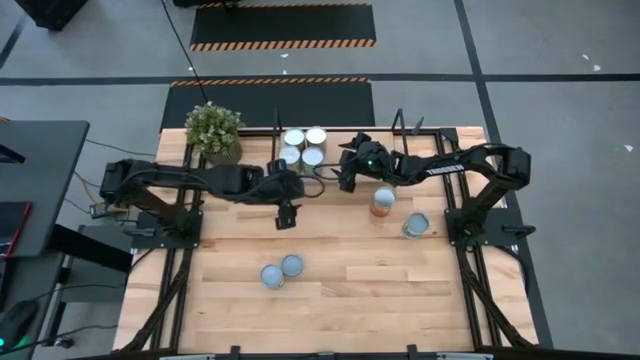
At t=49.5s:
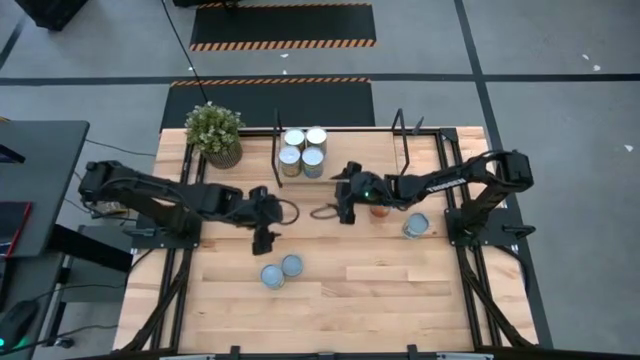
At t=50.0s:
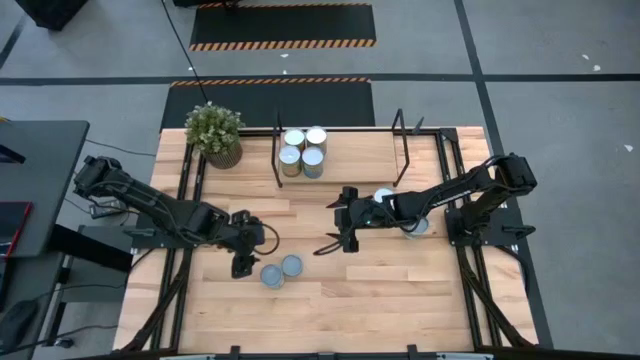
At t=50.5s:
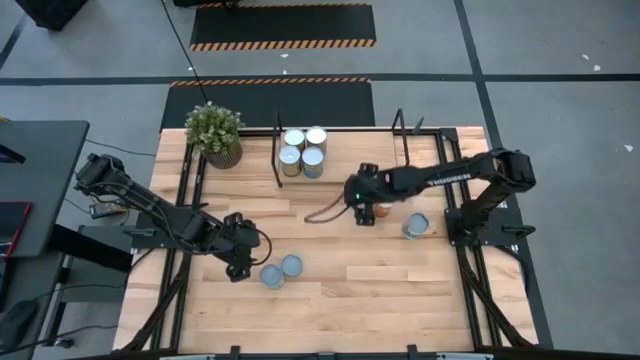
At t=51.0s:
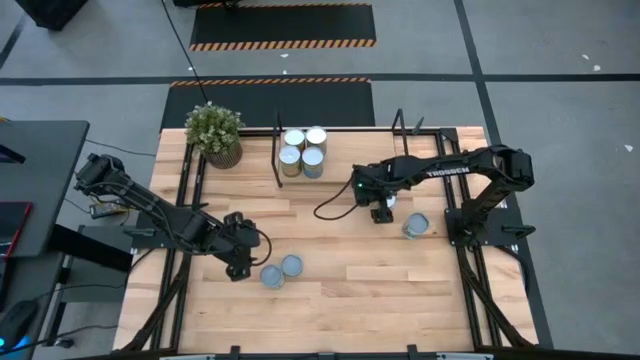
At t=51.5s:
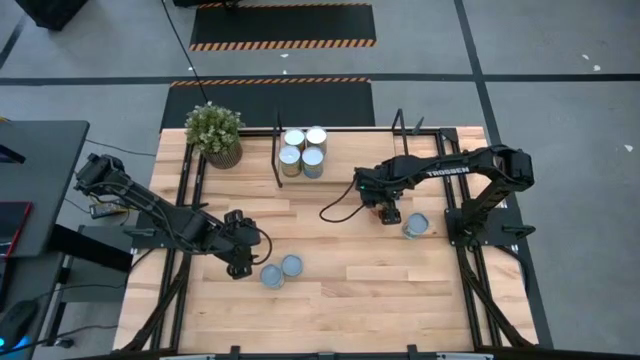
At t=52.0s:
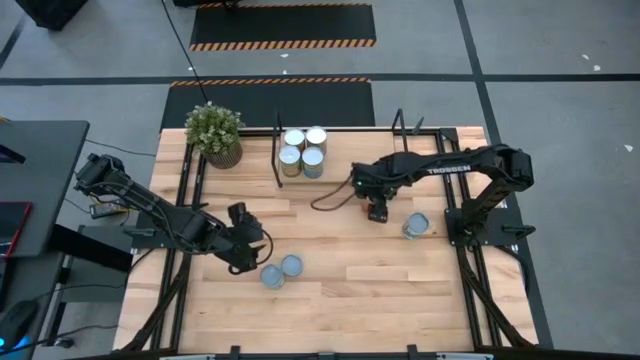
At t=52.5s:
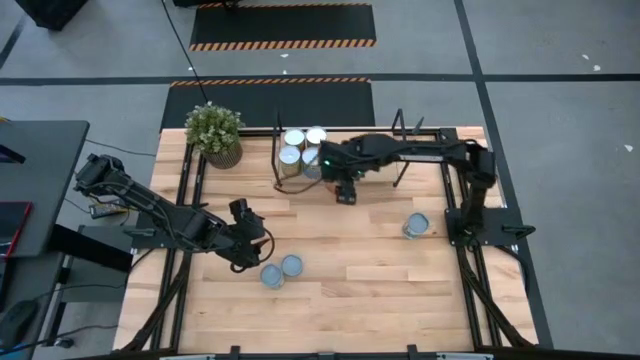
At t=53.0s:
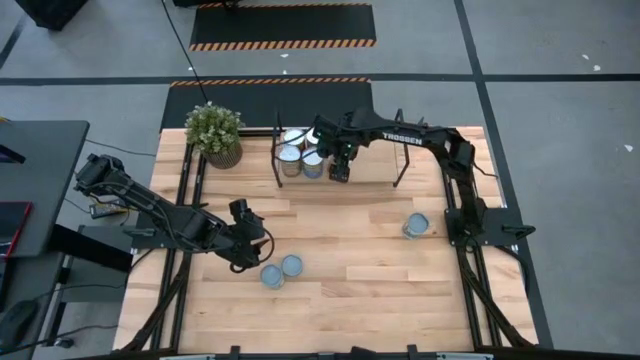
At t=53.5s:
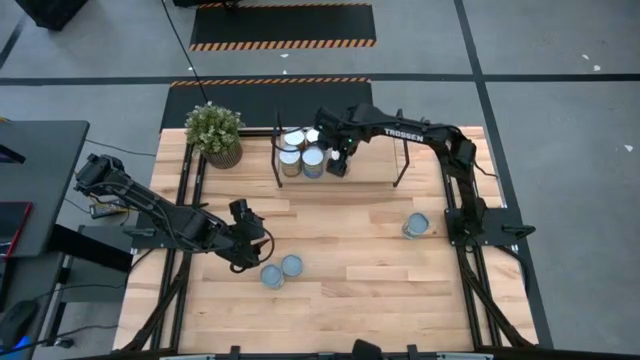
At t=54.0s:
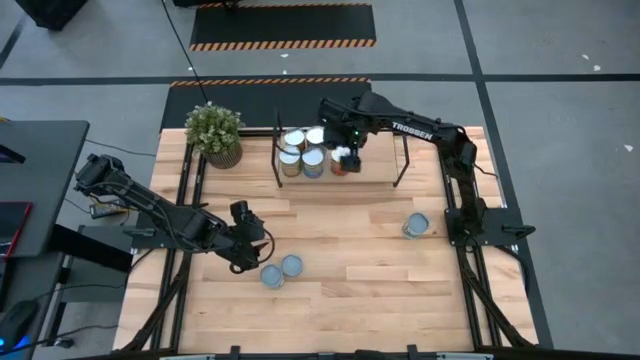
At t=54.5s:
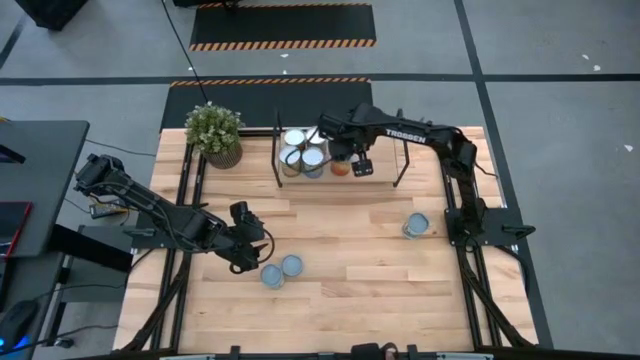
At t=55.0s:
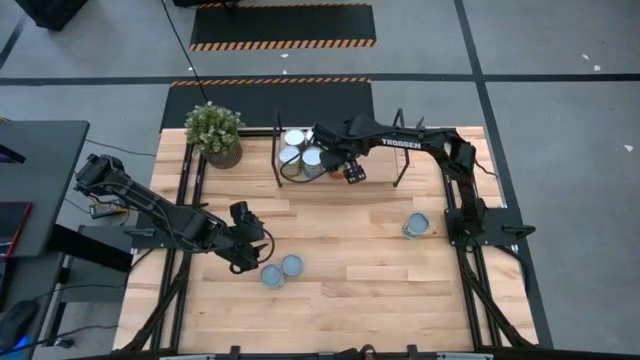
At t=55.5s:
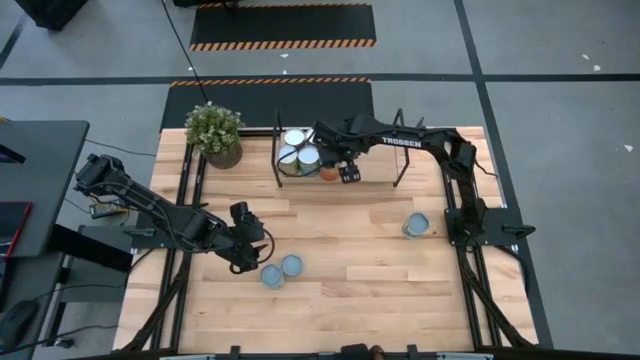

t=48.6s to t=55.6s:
Task: Pick and place cans onto a shelf
Put the canned corn on the shelf

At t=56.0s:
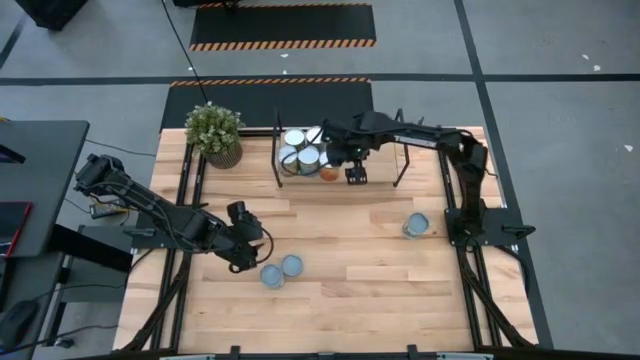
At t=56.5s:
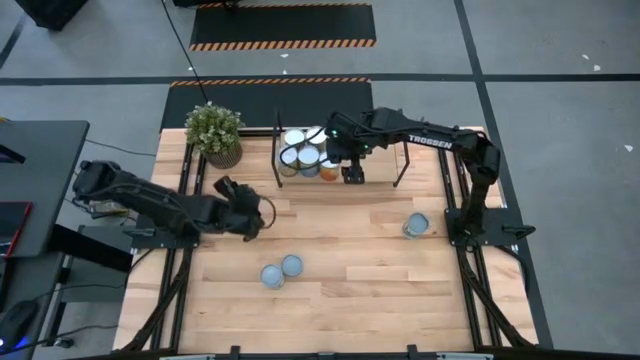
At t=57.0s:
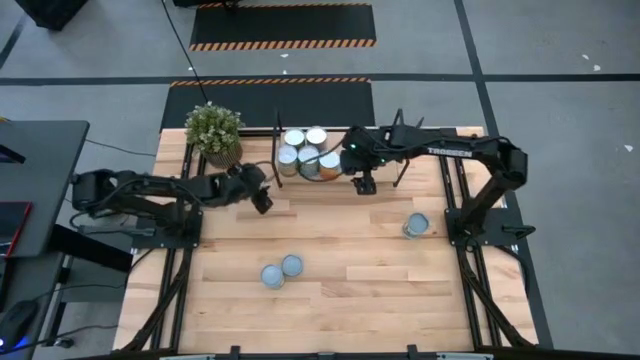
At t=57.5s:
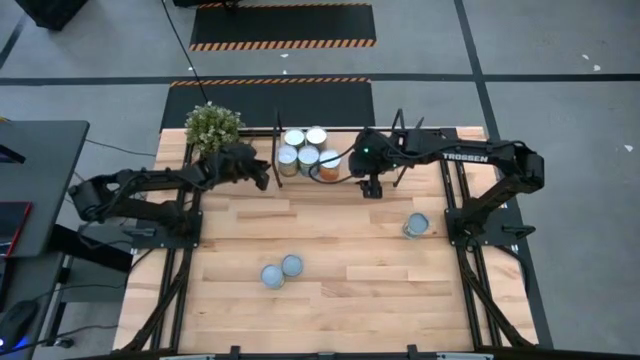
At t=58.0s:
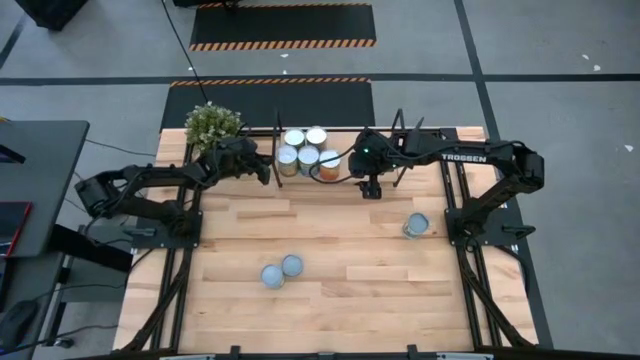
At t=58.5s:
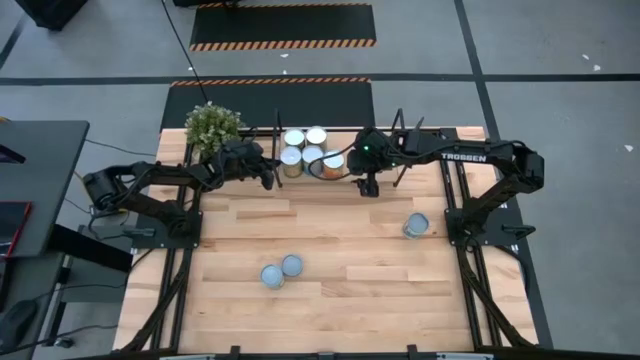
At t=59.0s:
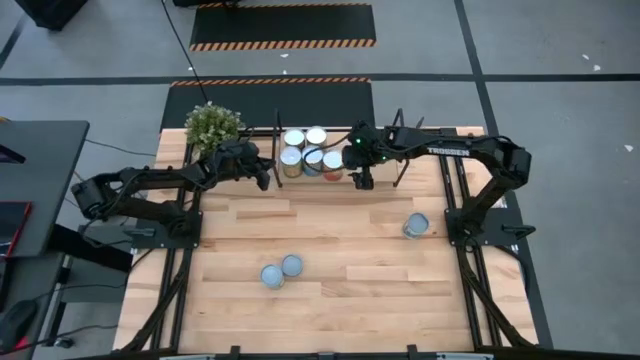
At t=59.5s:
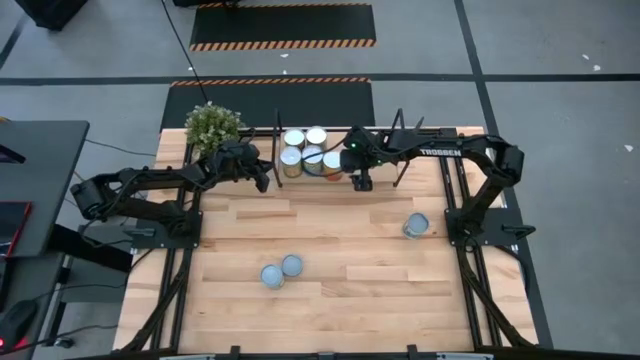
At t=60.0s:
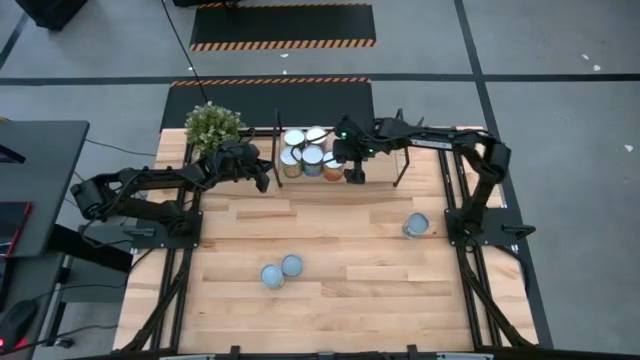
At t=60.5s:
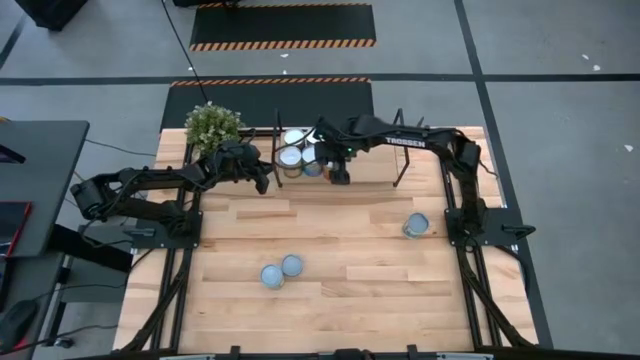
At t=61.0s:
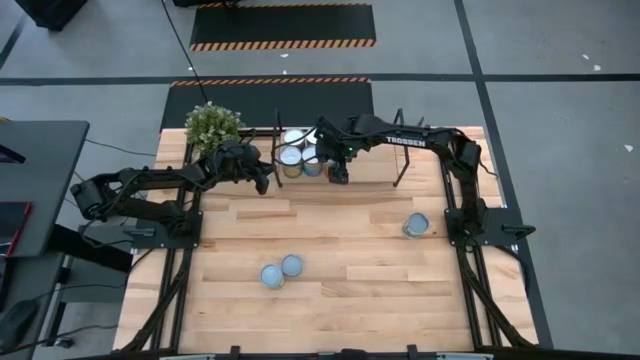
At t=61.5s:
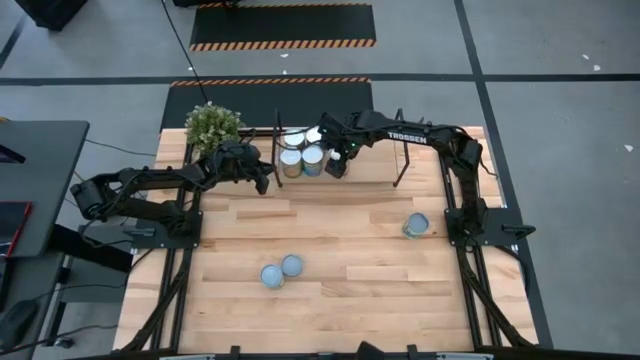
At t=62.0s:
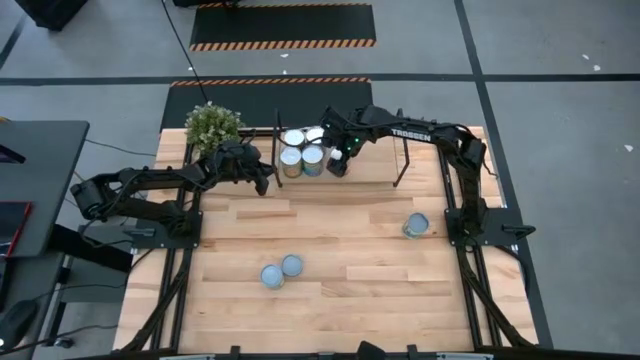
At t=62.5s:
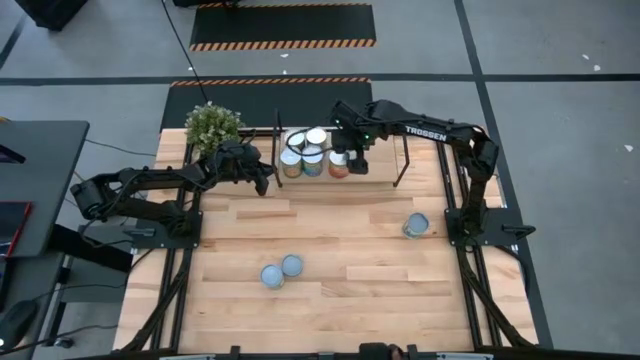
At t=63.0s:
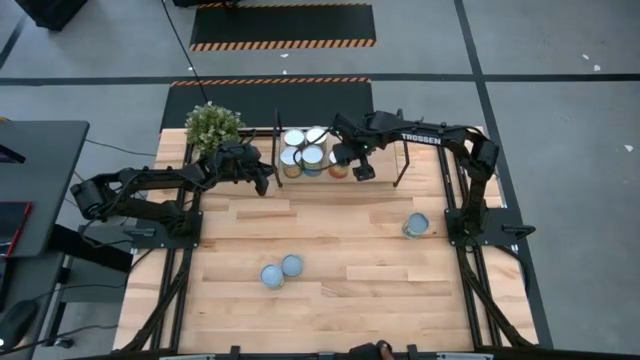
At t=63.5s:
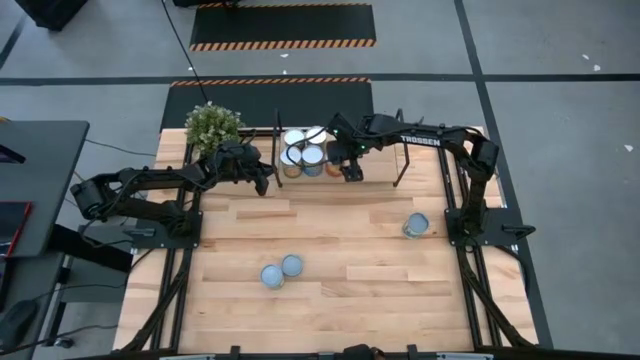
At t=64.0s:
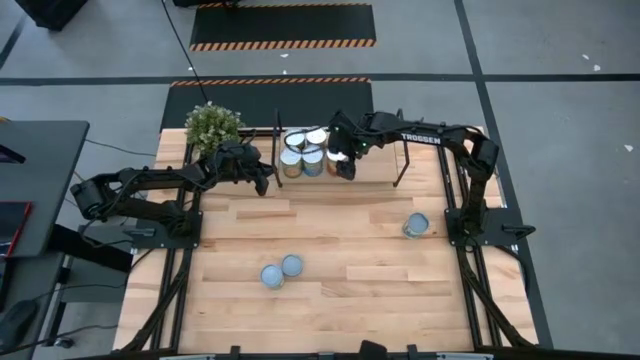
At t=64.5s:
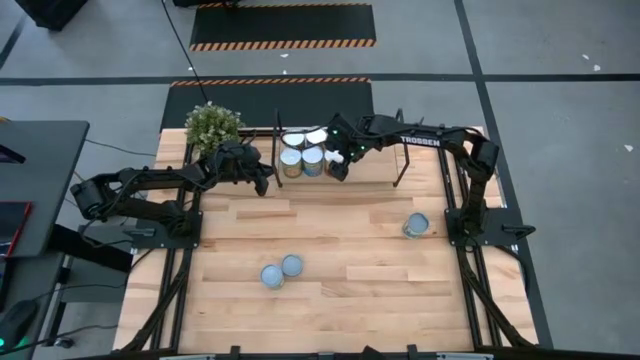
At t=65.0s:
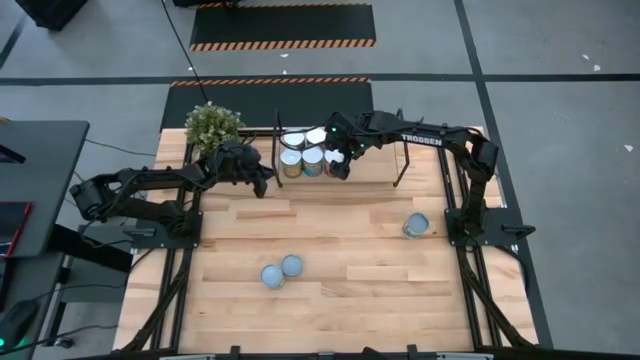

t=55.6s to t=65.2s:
Adjust the canned goods on the shelf

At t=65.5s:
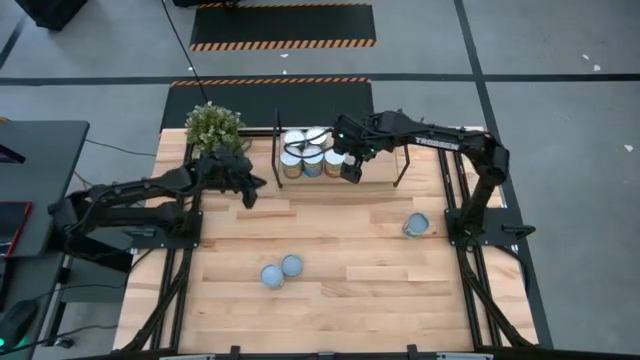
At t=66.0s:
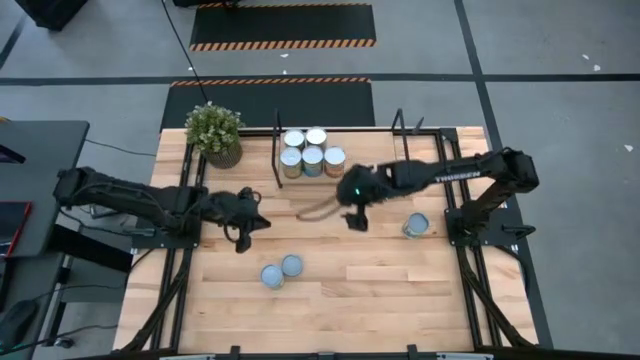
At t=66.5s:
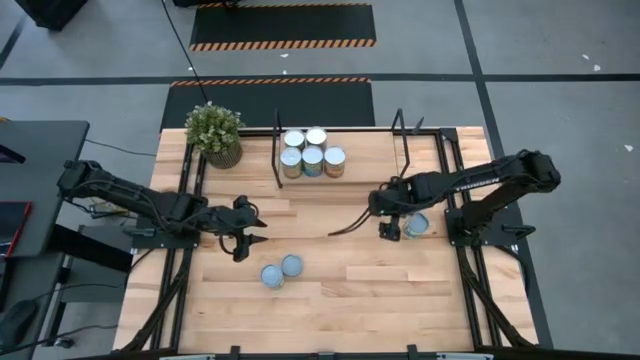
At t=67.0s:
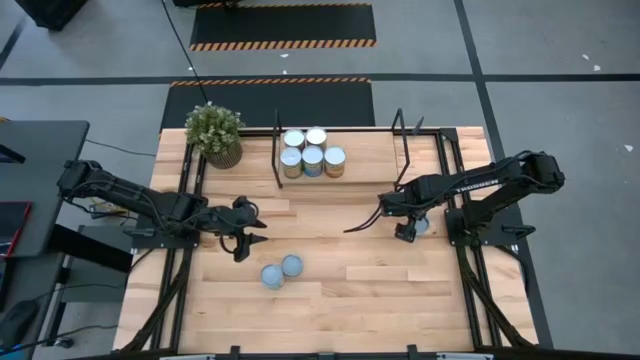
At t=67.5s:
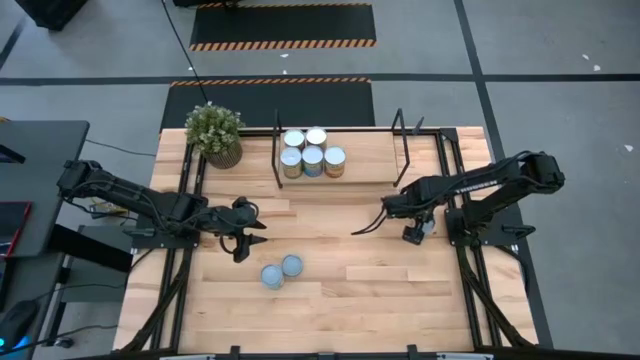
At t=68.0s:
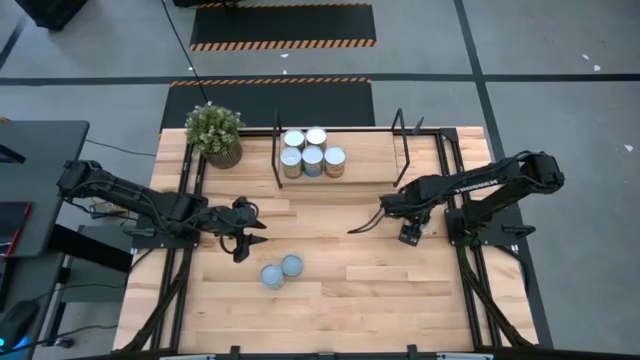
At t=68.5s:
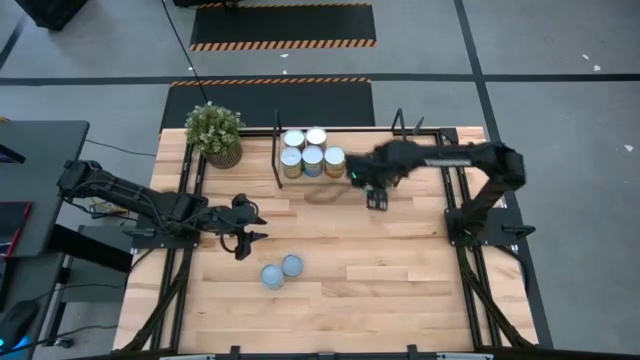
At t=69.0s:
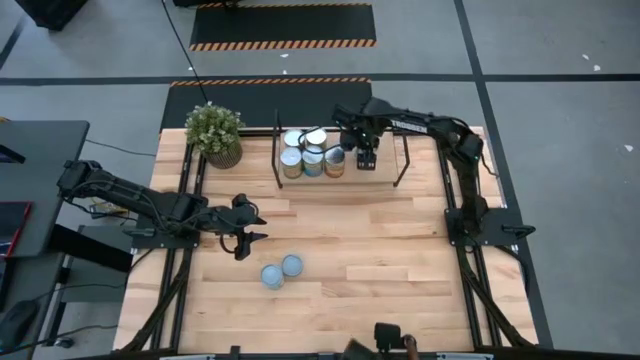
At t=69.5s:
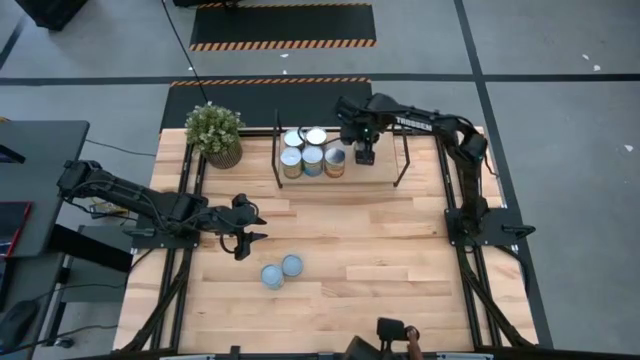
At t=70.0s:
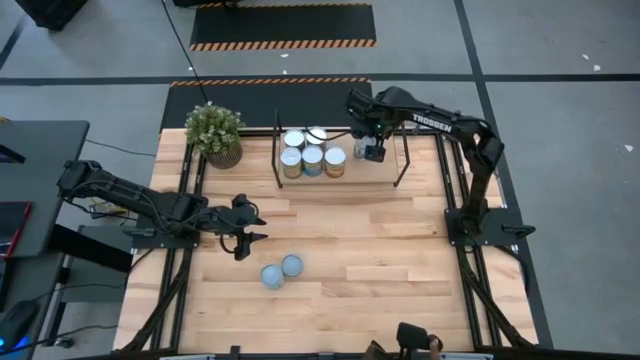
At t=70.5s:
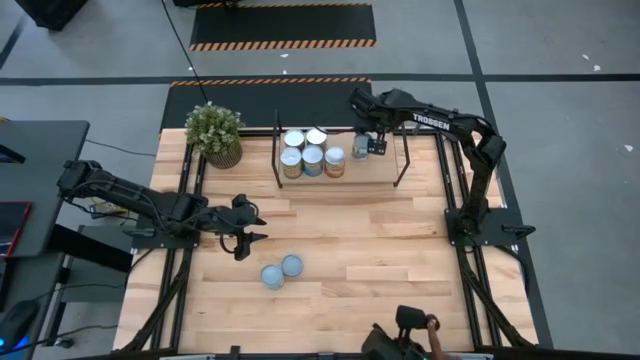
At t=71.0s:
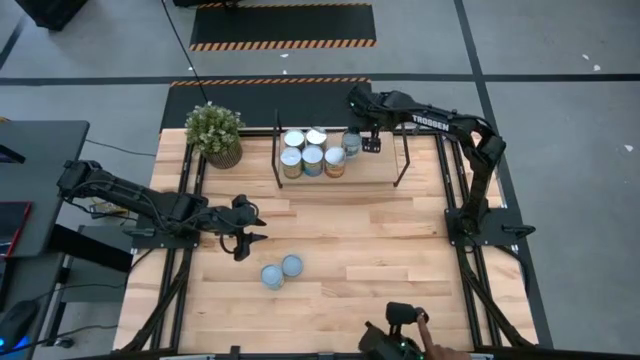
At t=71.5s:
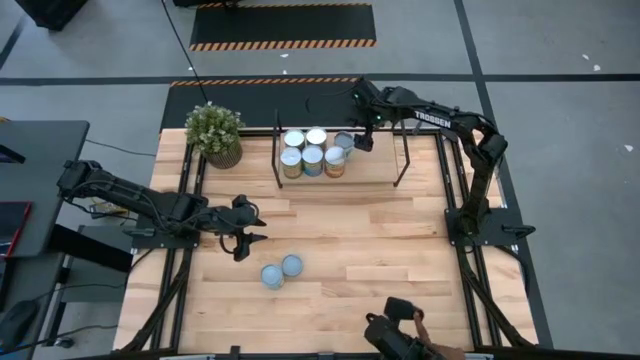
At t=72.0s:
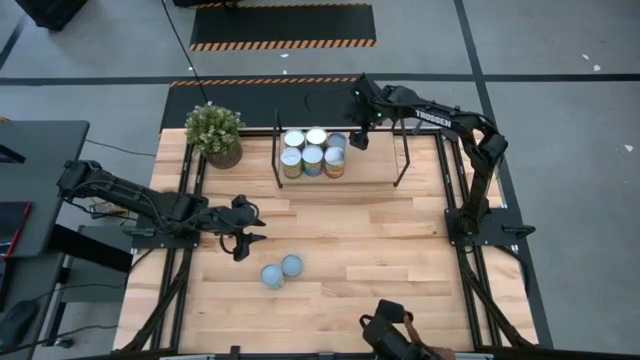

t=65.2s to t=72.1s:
Put the canned mixed vegetables on the shelf
